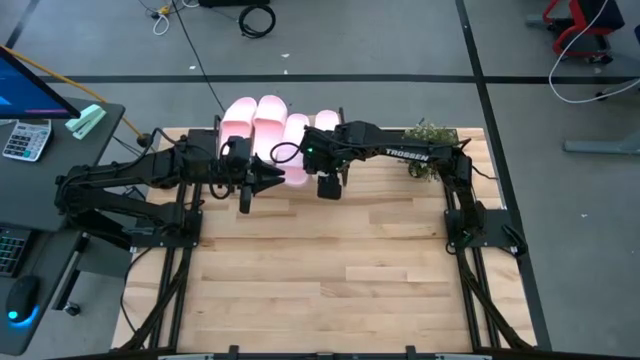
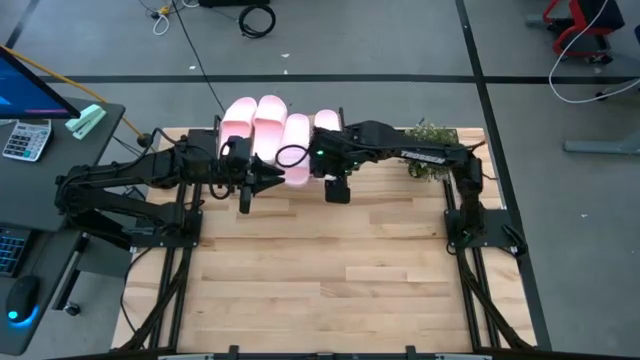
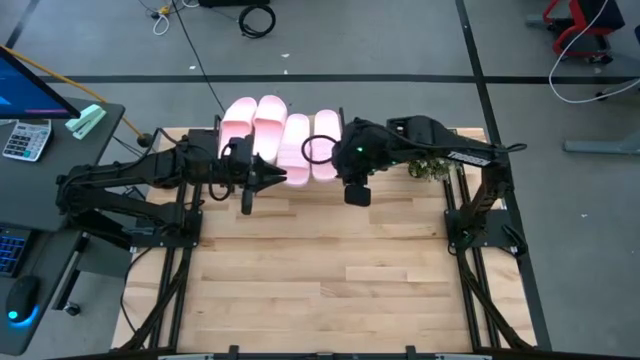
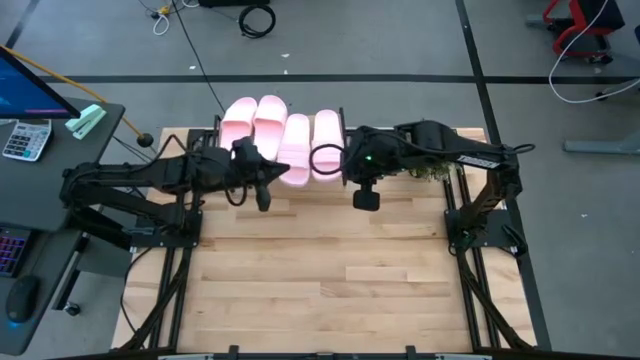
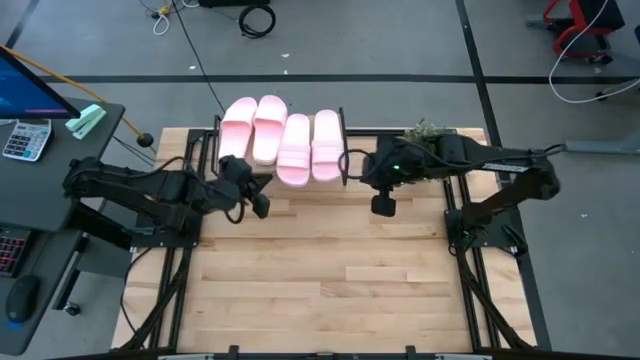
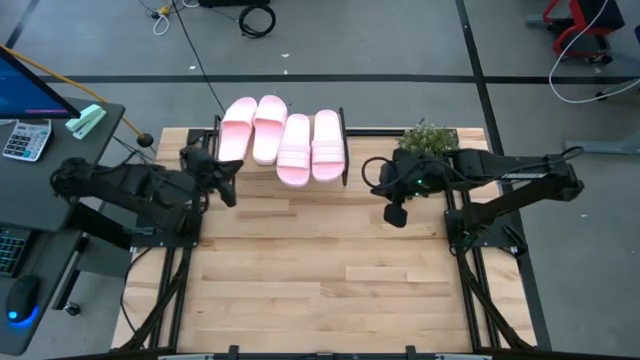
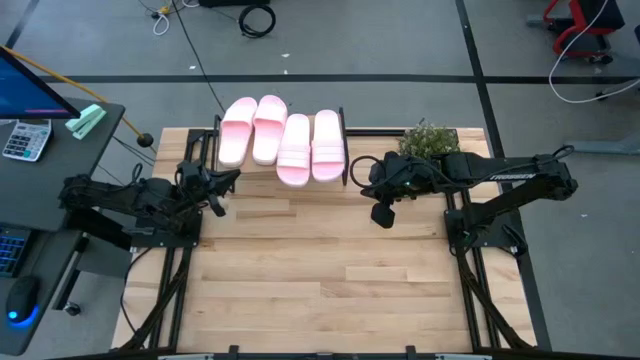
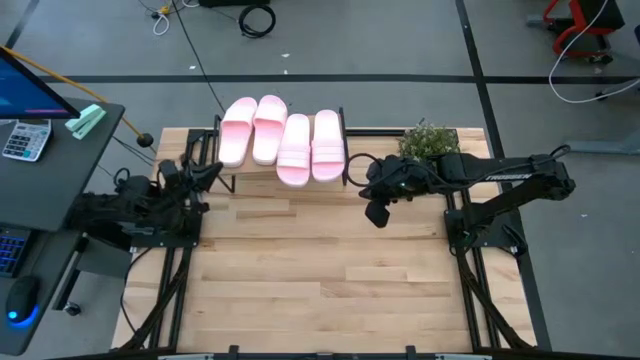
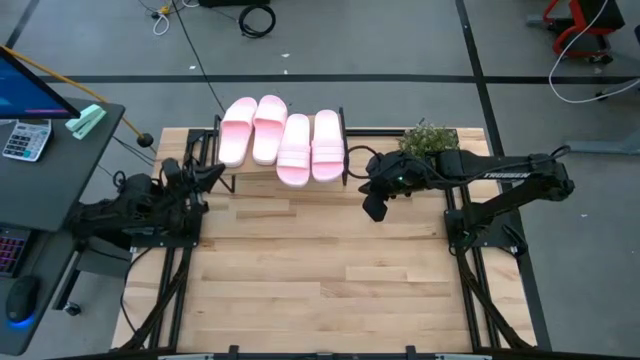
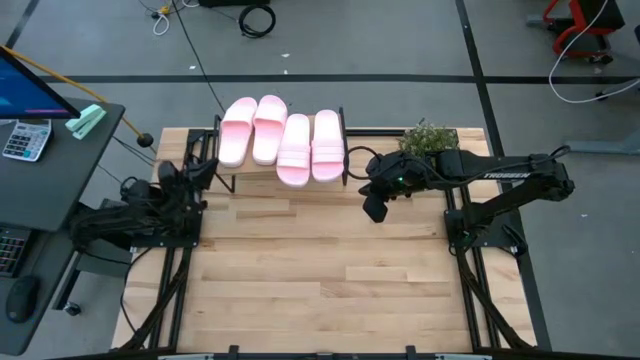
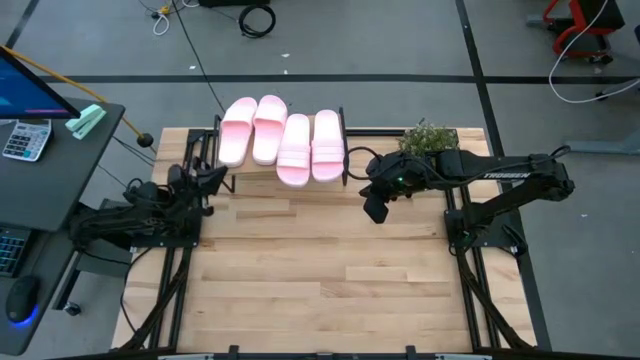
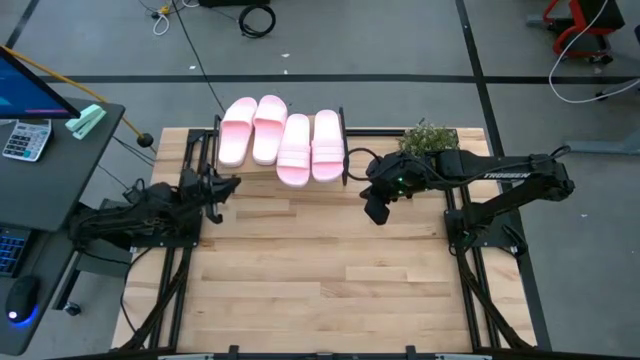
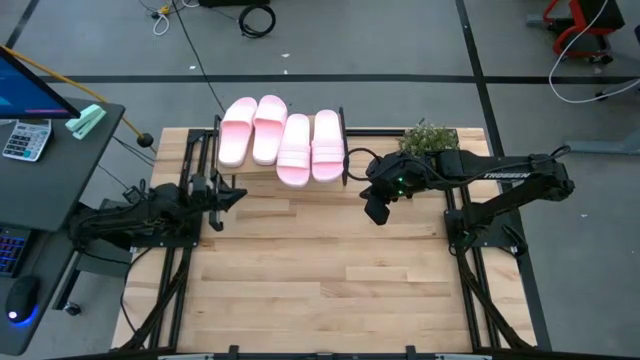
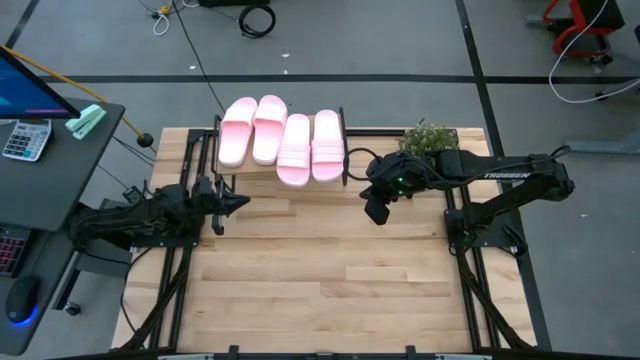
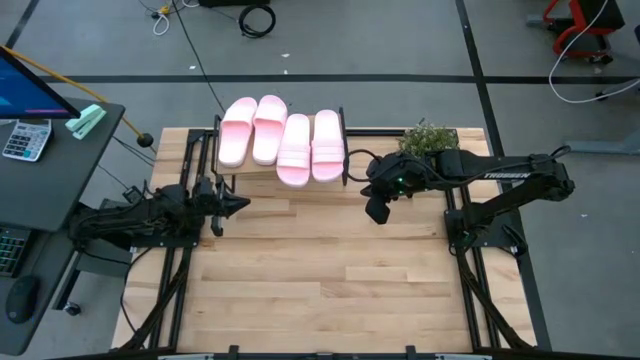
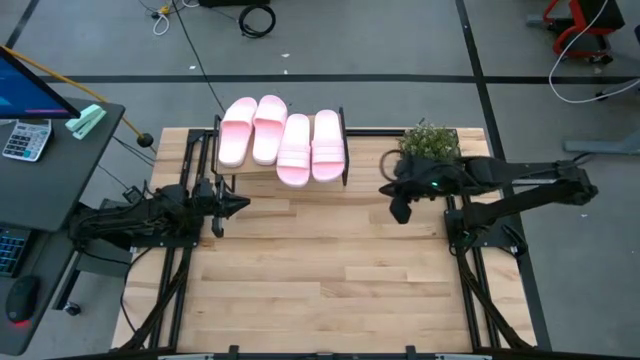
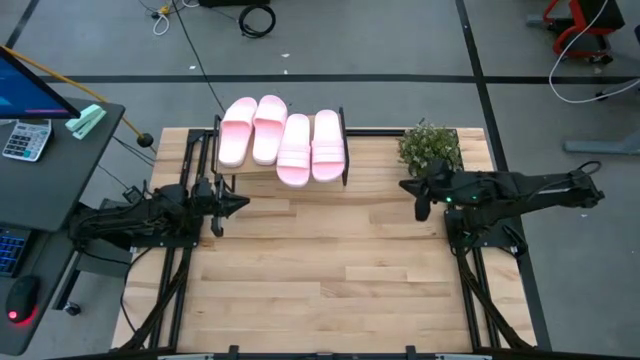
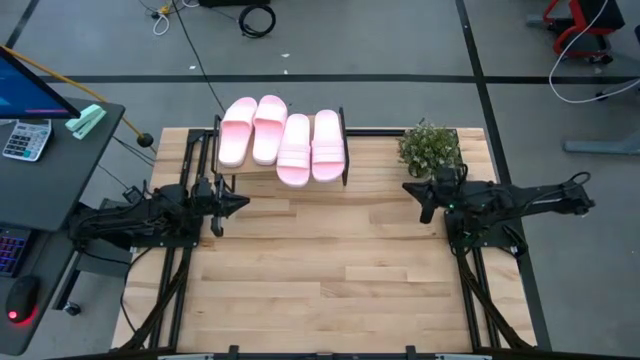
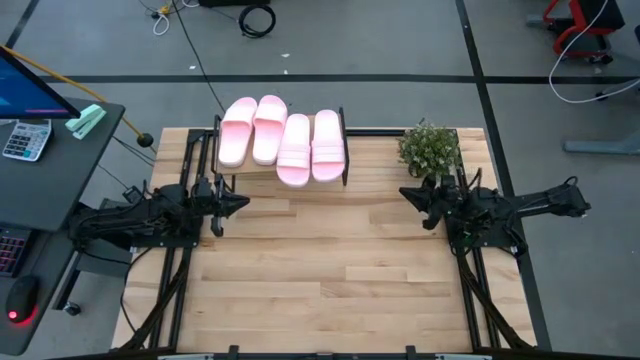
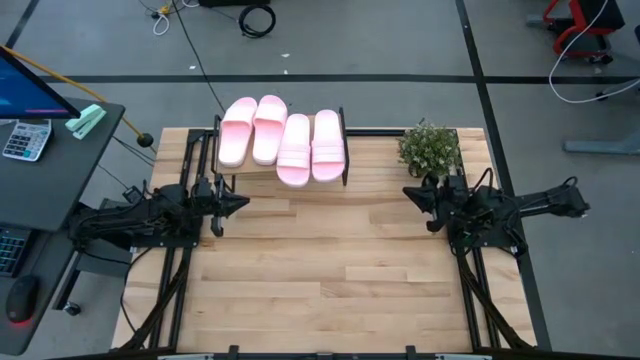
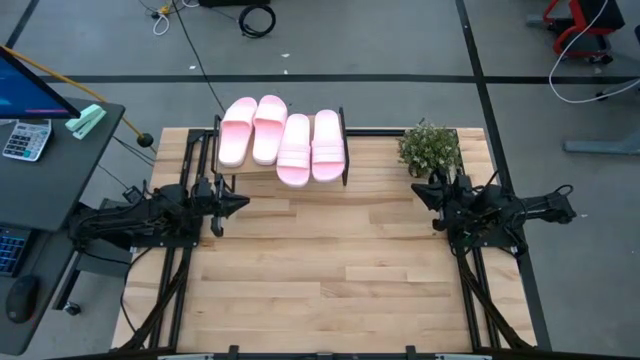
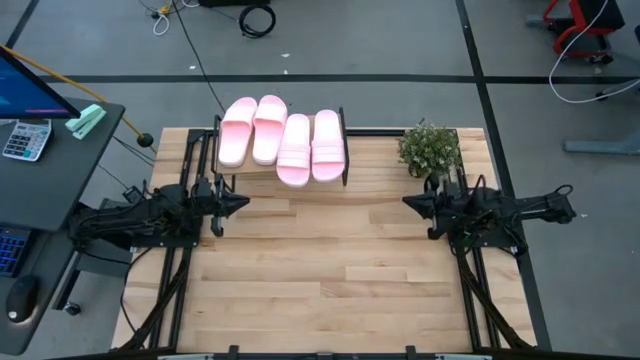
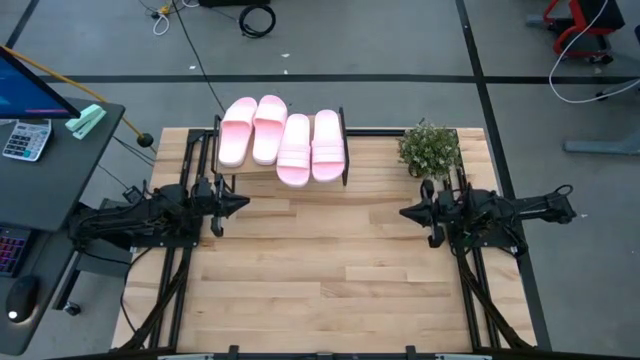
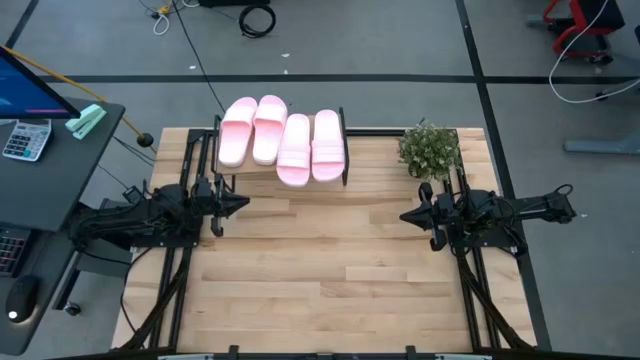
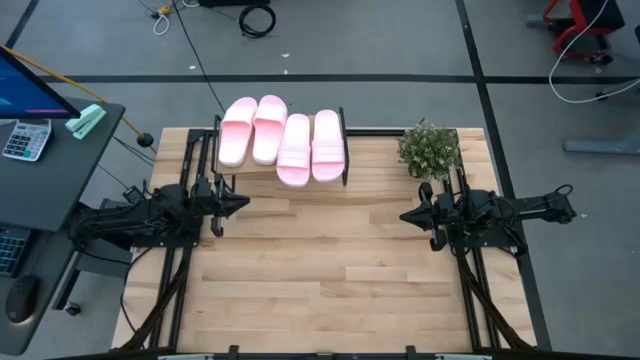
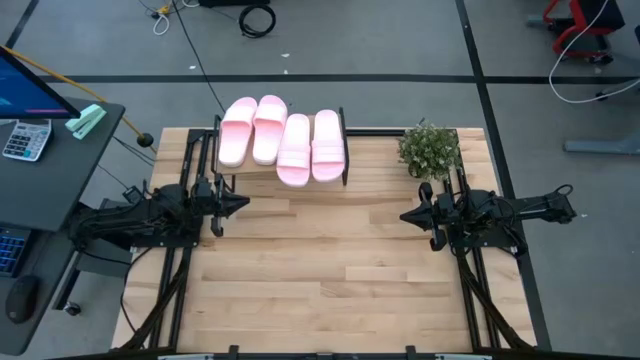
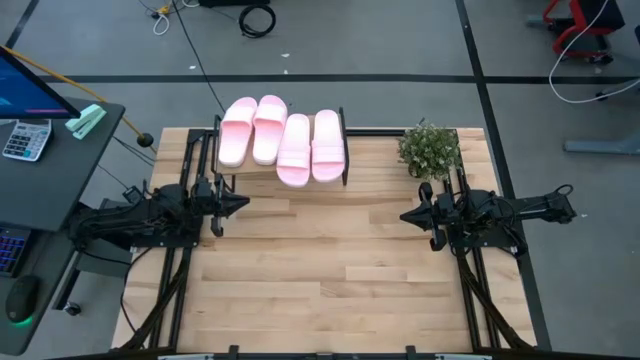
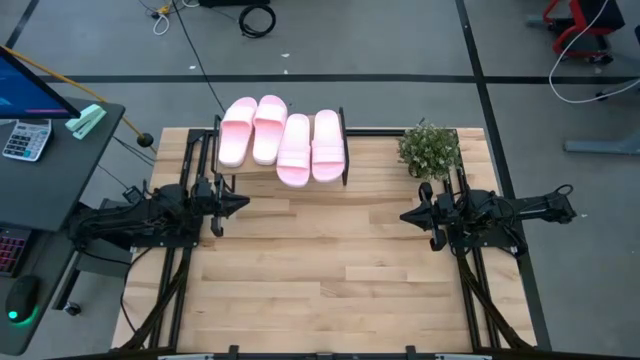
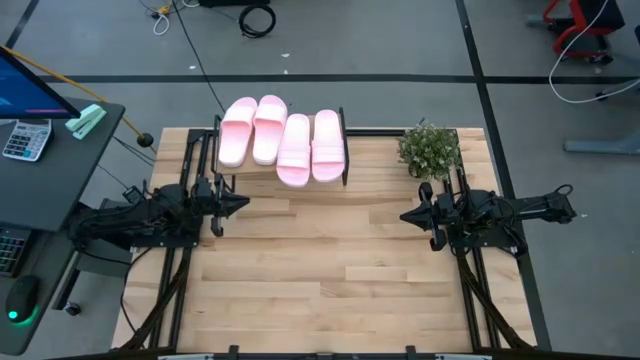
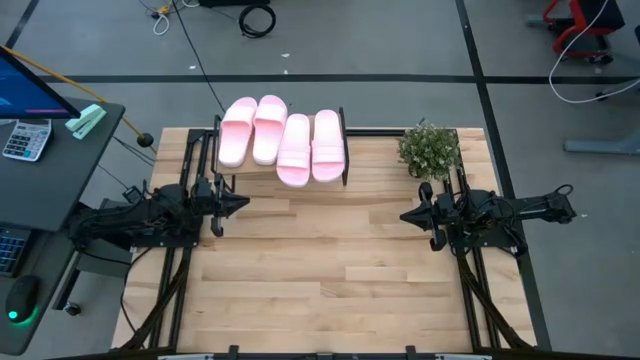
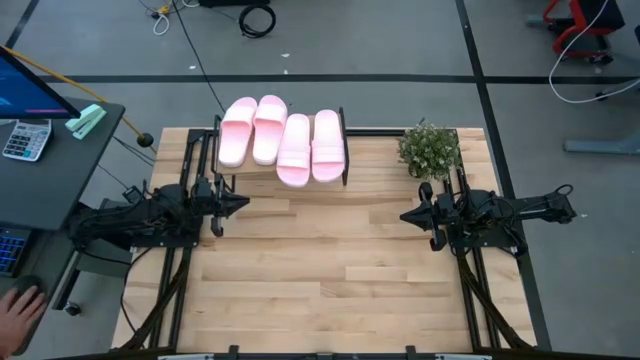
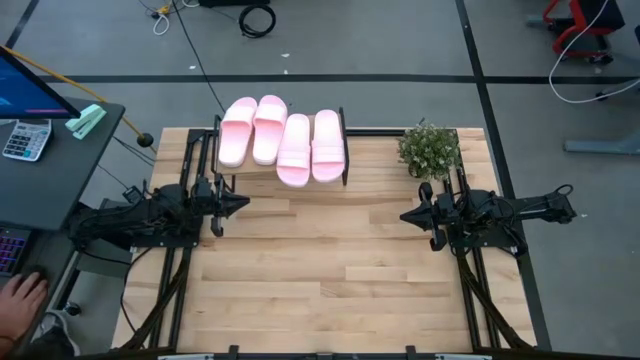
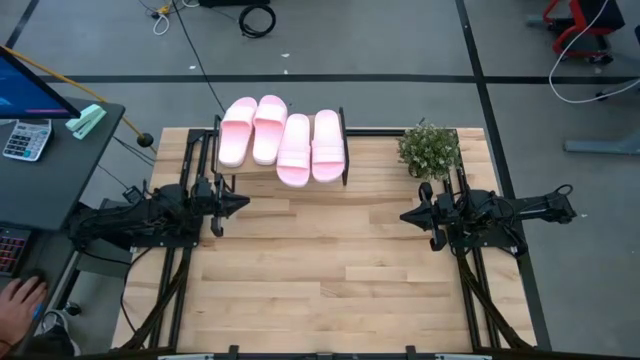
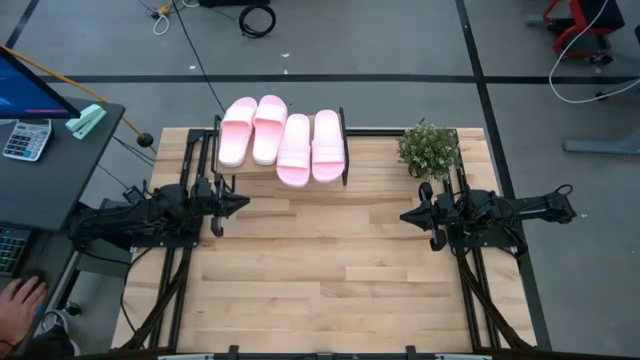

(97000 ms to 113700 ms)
Task: Pick and place slides into the shelf
Return to Home Position

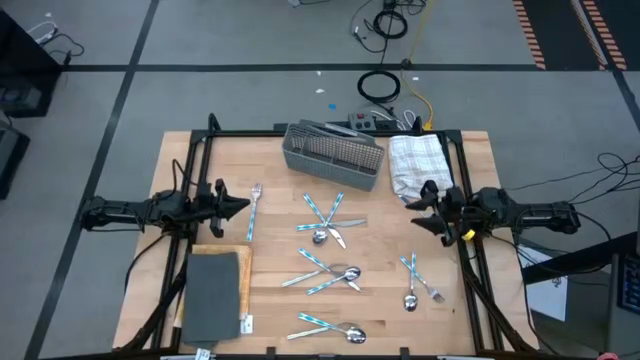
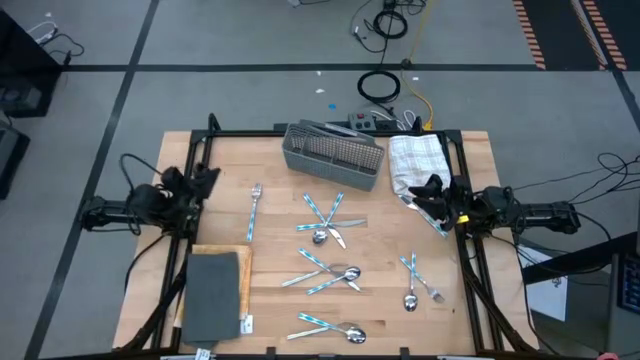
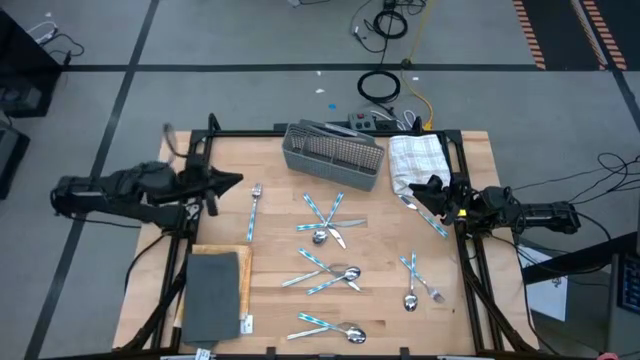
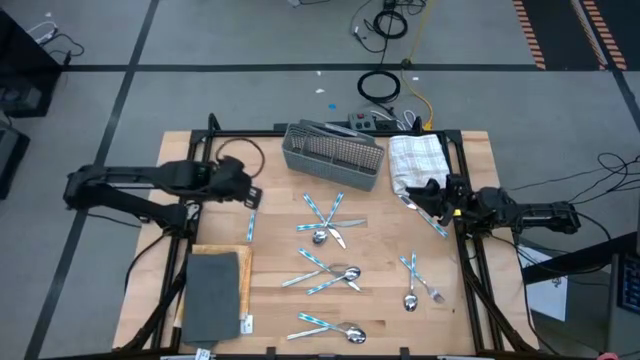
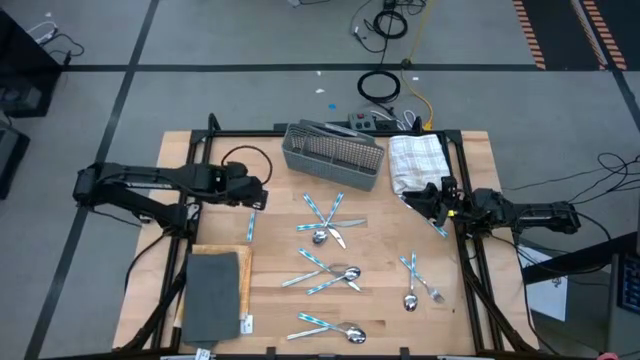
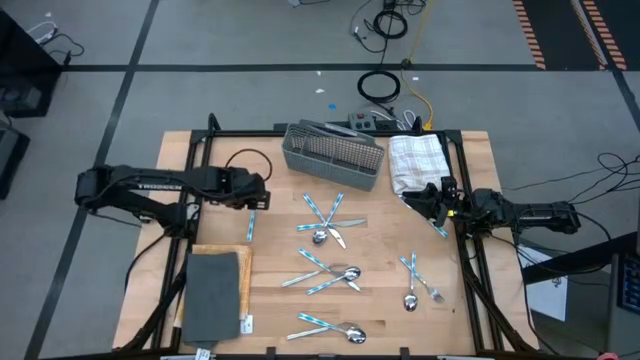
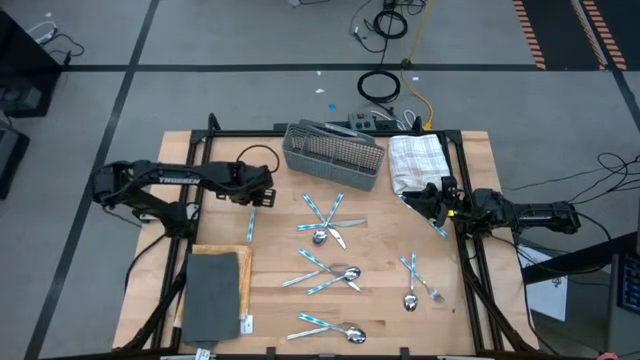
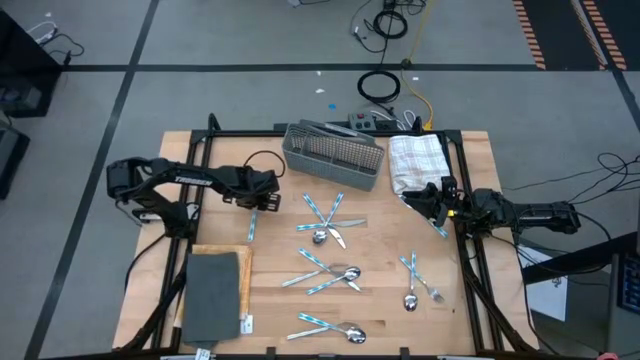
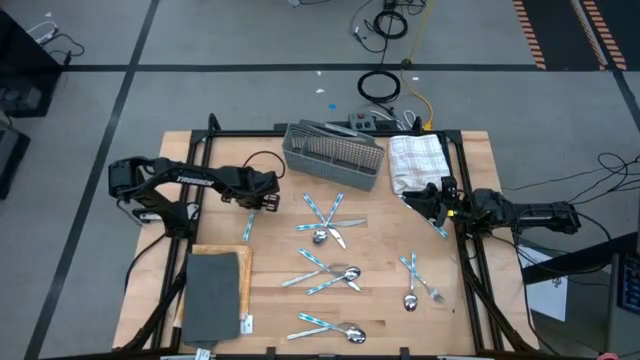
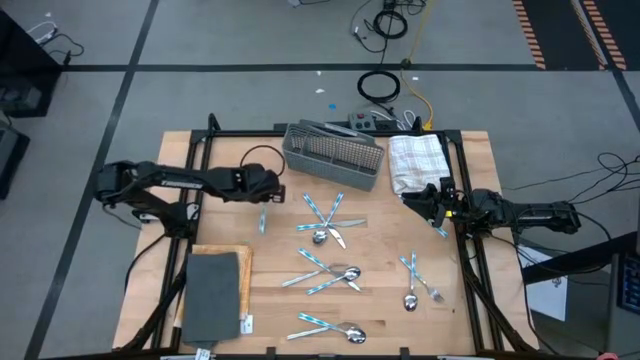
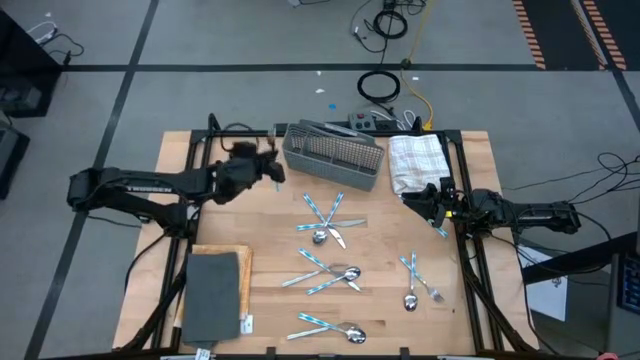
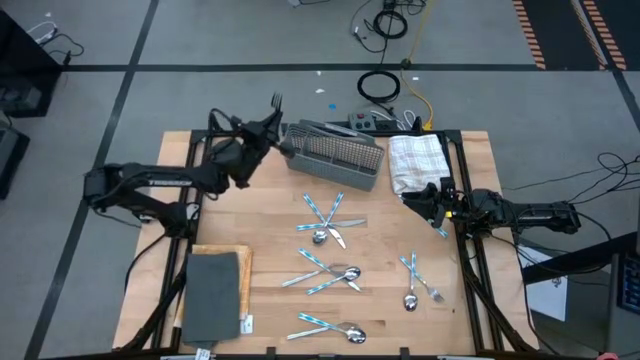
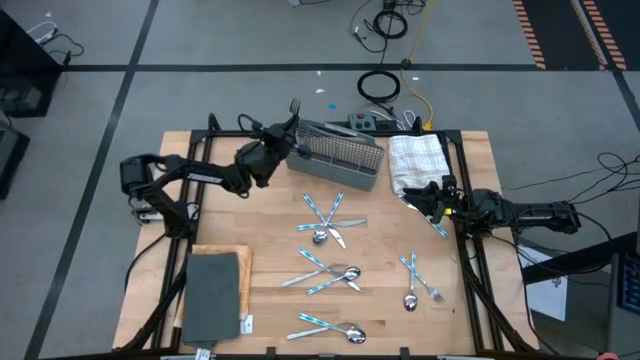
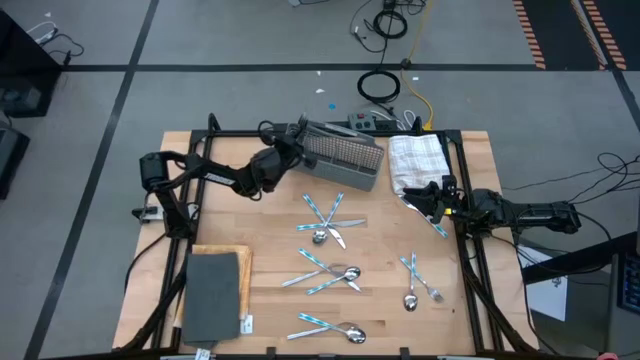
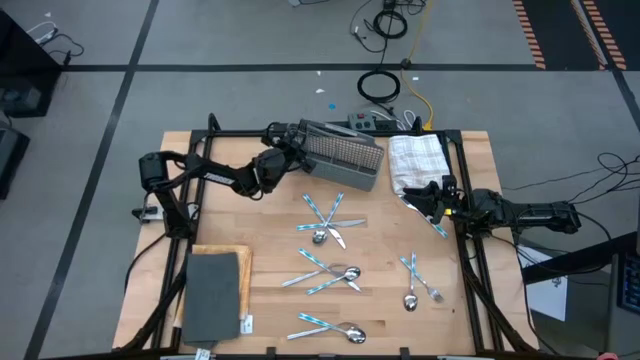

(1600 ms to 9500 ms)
Task: Sort silverware
Put the fork into the silverware basket
